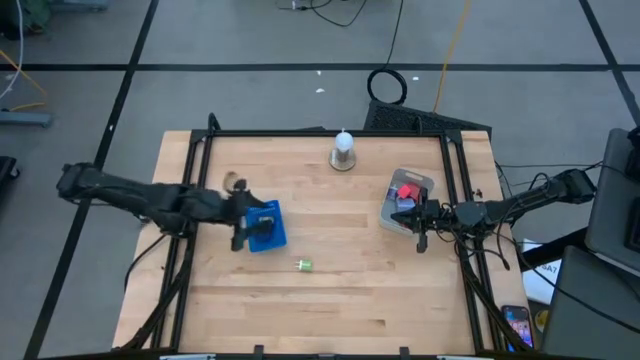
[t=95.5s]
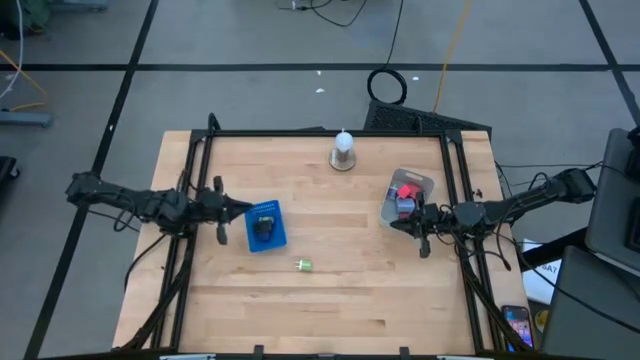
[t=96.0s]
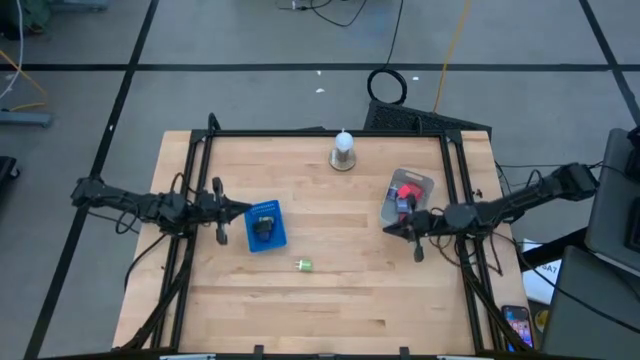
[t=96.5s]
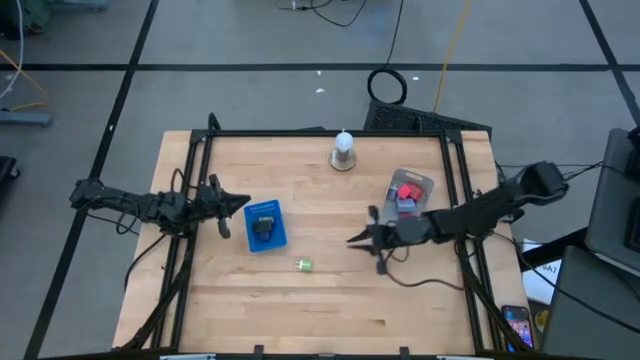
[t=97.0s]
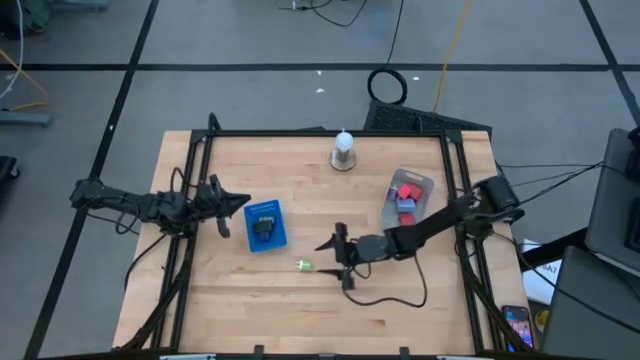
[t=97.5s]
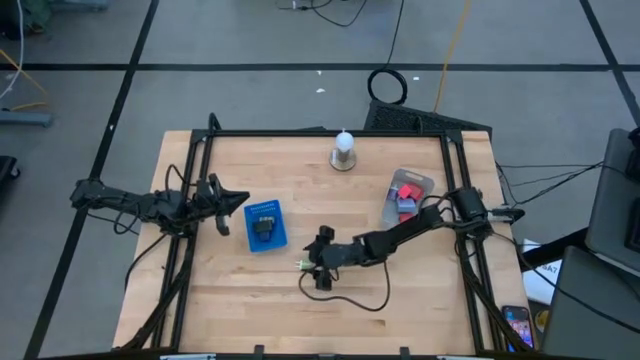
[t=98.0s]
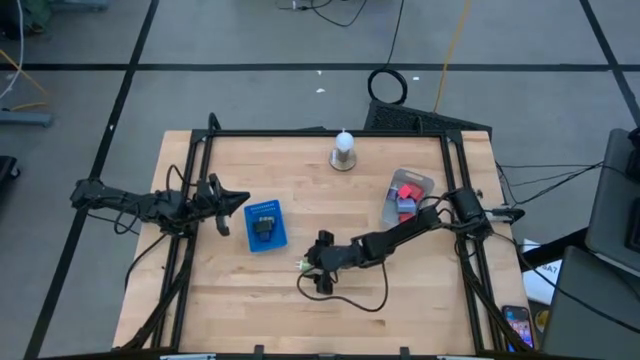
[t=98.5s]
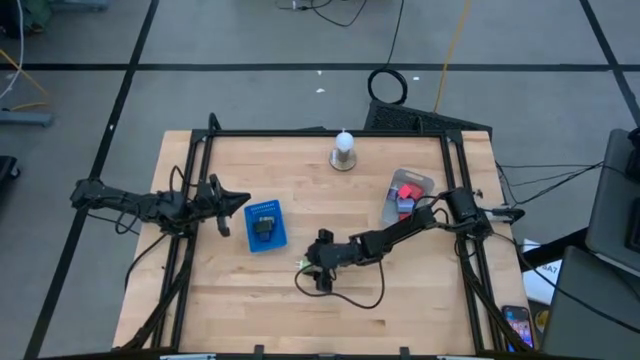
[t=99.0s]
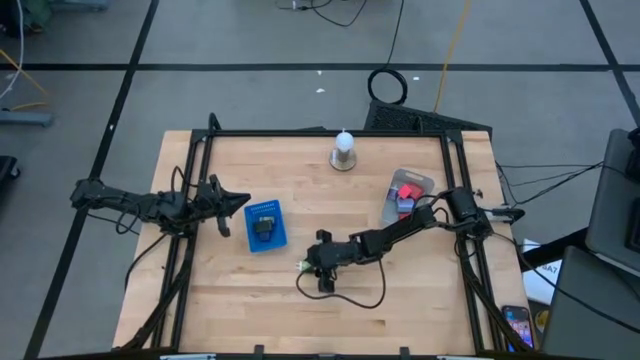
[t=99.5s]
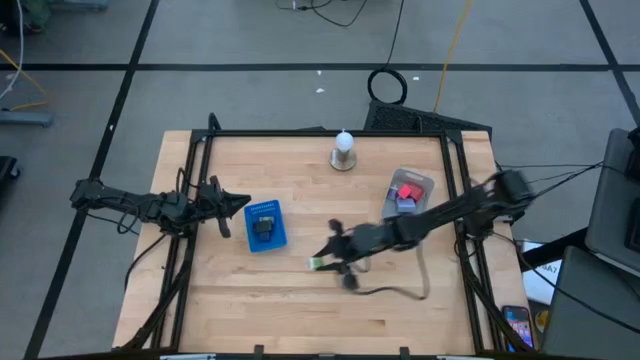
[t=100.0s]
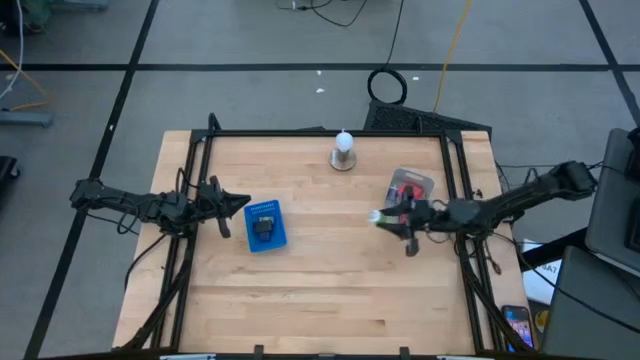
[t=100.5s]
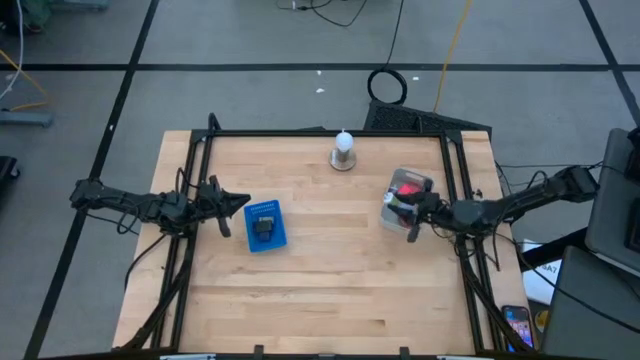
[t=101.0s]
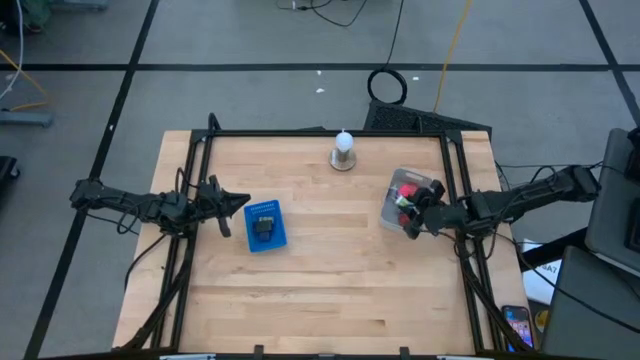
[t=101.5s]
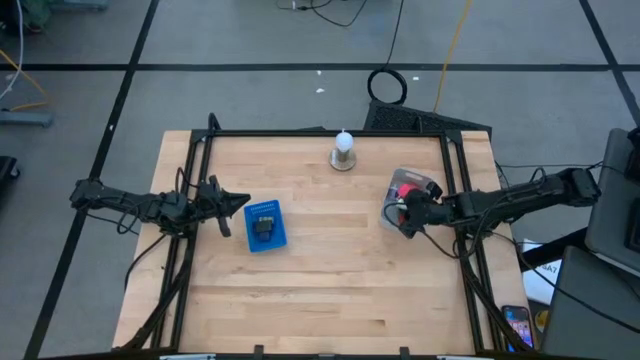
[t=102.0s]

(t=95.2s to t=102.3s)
Task: Pick & Place Office items
Put the green charger adapter into the gray bin

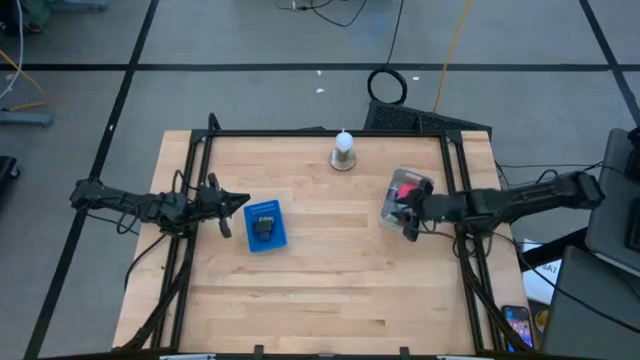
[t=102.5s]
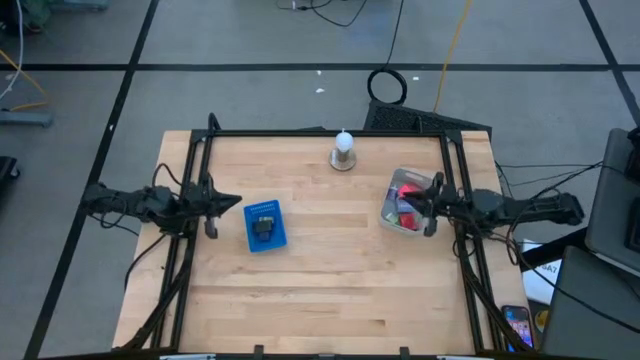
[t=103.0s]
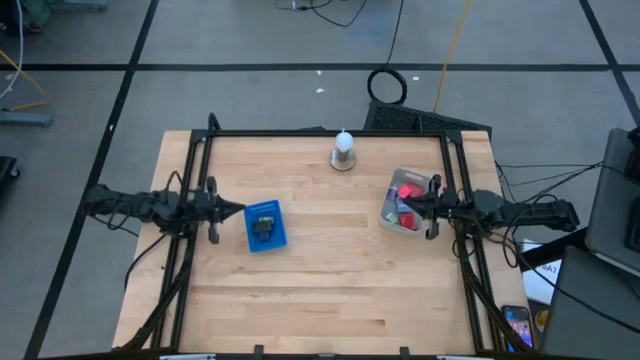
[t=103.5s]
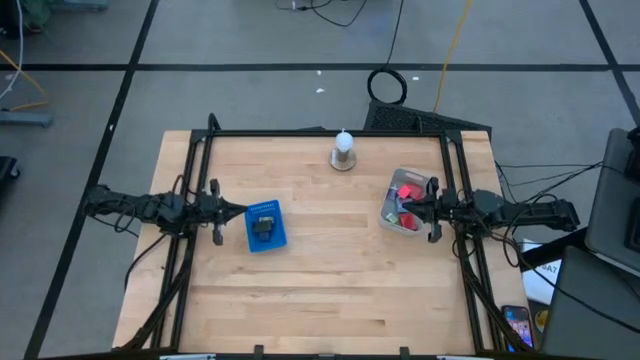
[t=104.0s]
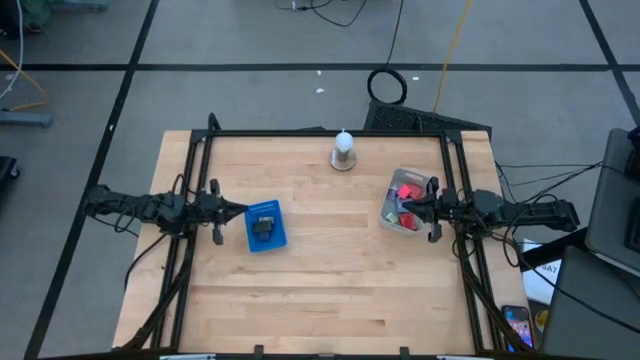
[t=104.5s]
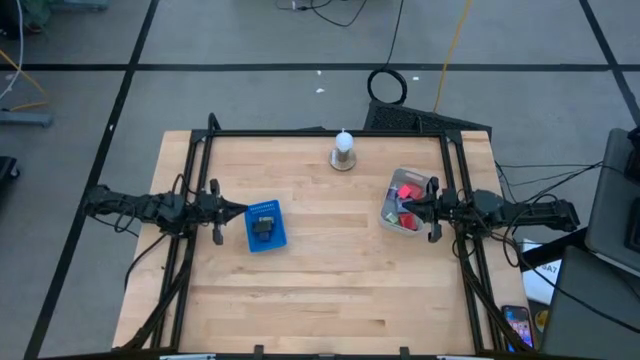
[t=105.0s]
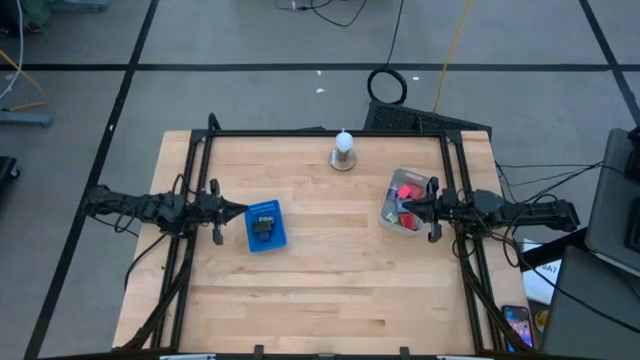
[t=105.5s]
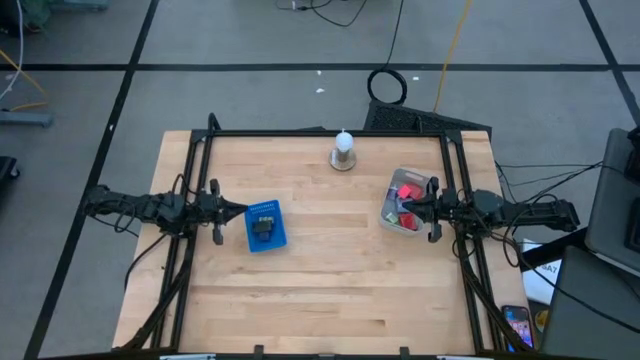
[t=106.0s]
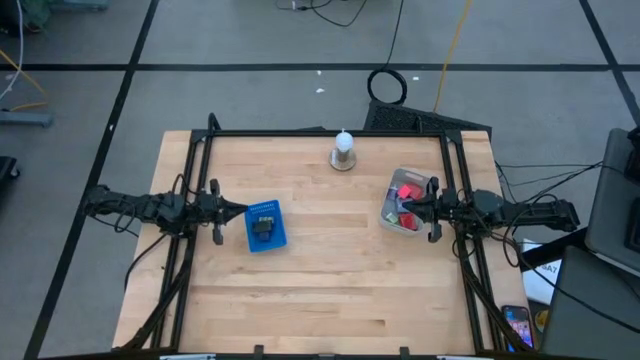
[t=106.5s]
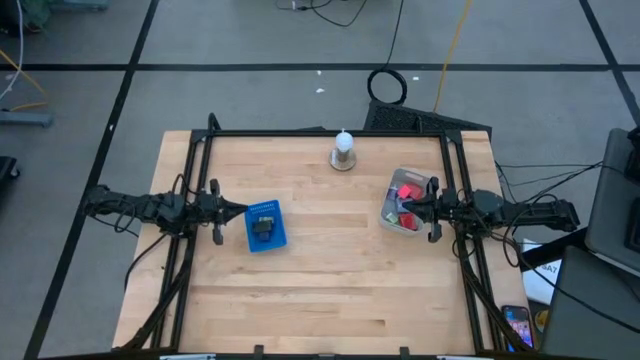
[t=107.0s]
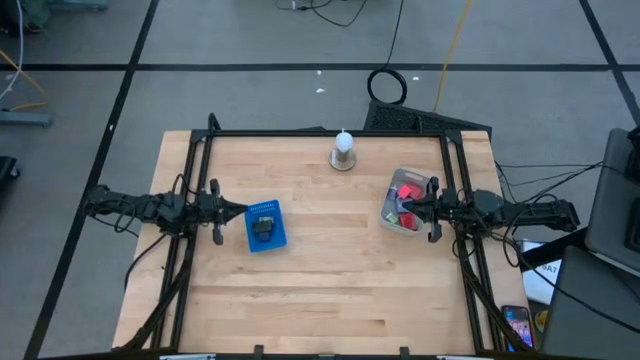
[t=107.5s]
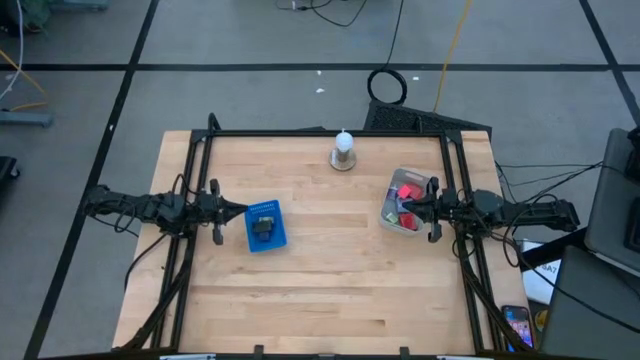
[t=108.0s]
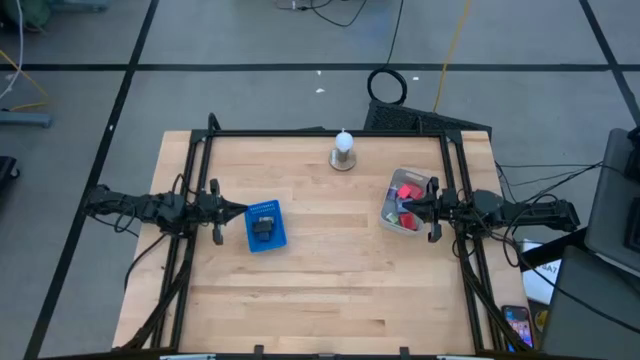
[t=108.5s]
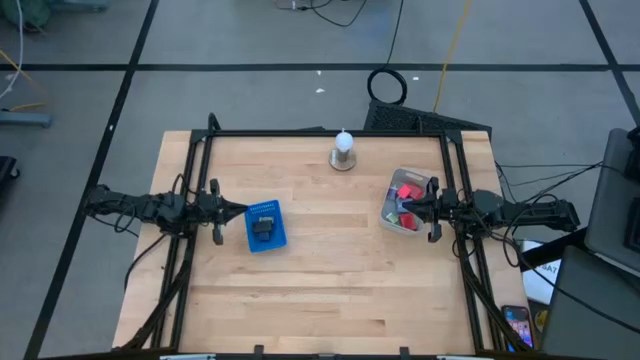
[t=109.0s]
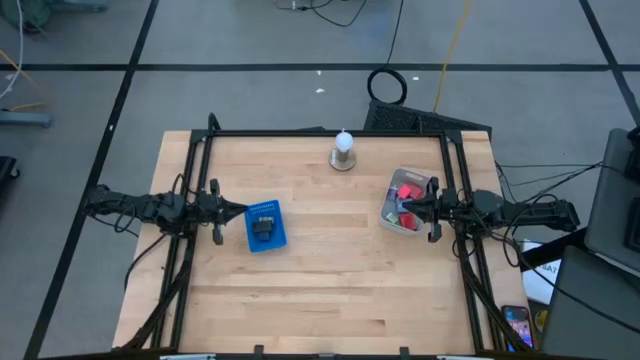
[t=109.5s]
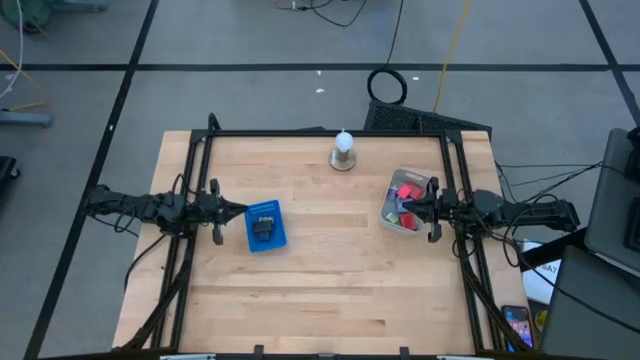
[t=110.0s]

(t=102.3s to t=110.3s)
Return to Home Position

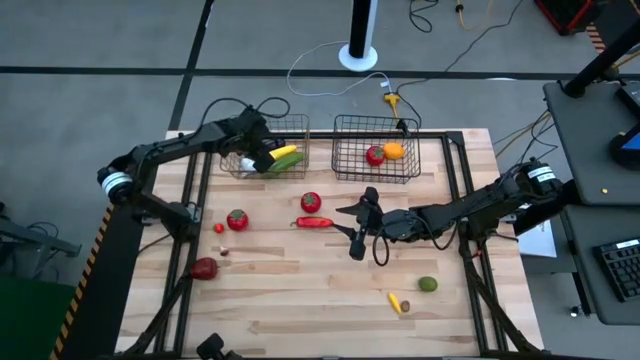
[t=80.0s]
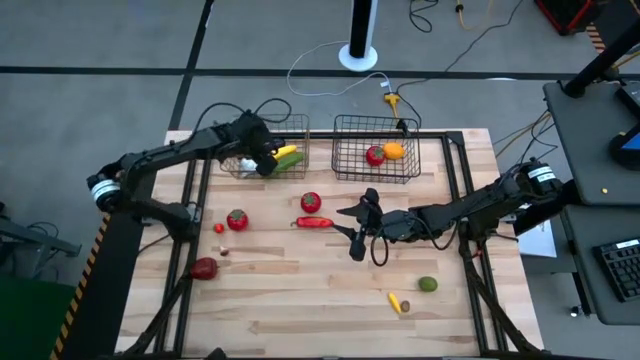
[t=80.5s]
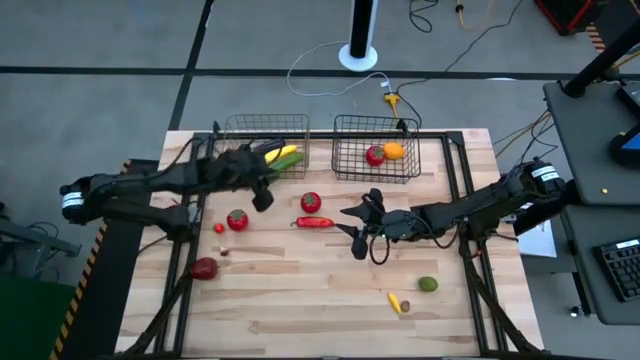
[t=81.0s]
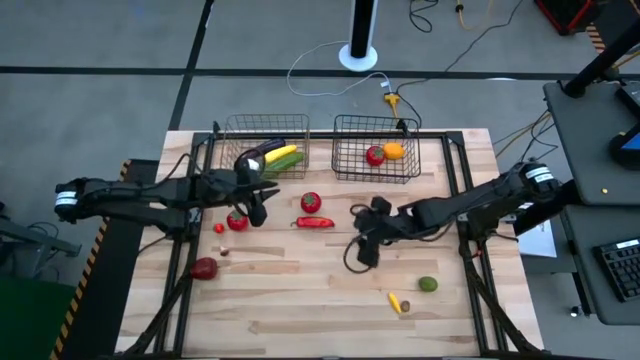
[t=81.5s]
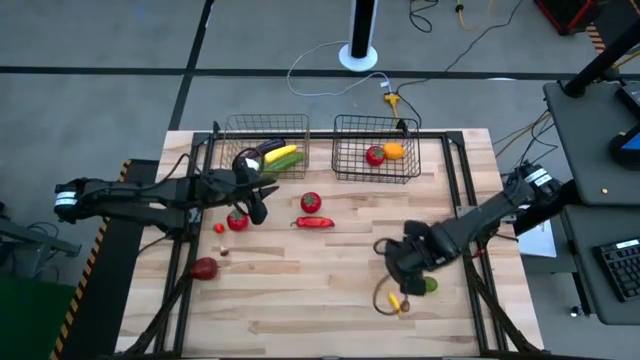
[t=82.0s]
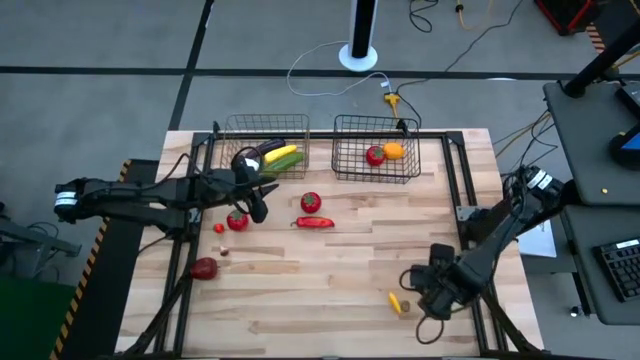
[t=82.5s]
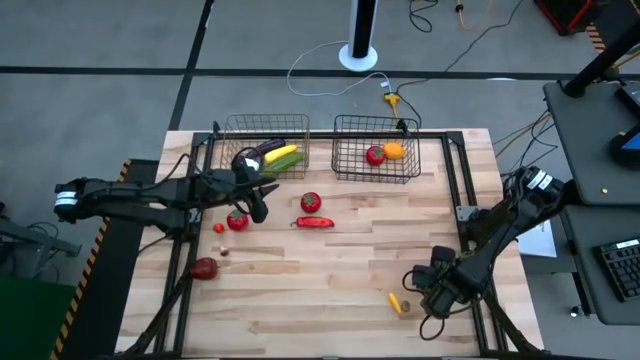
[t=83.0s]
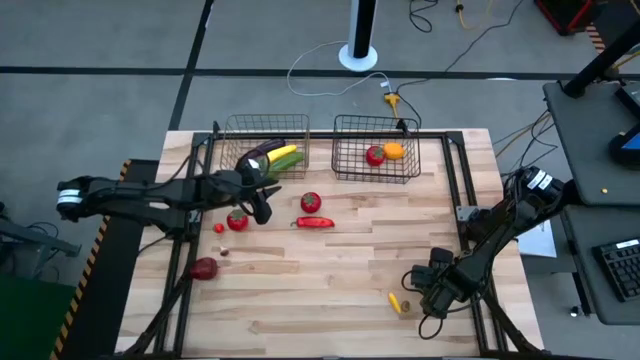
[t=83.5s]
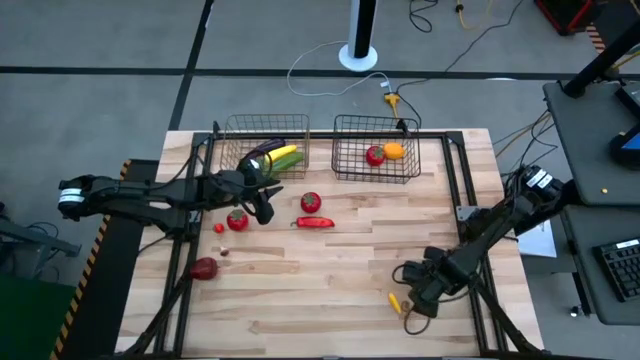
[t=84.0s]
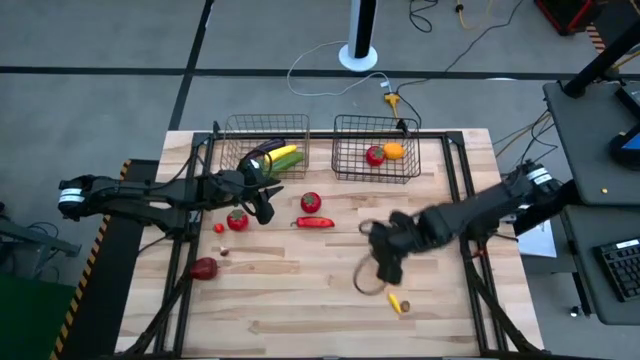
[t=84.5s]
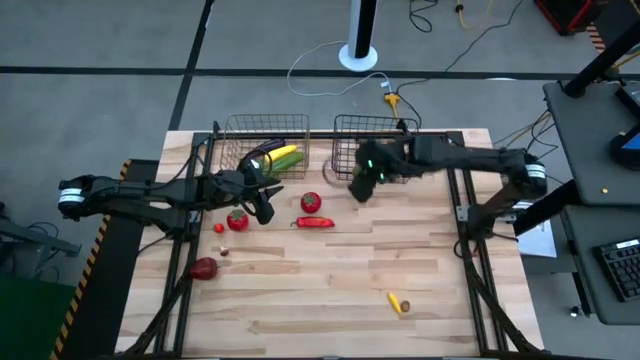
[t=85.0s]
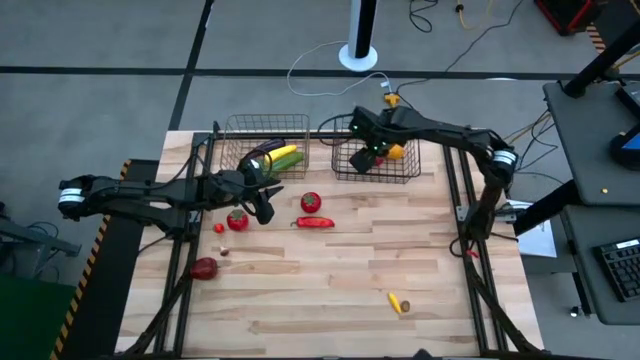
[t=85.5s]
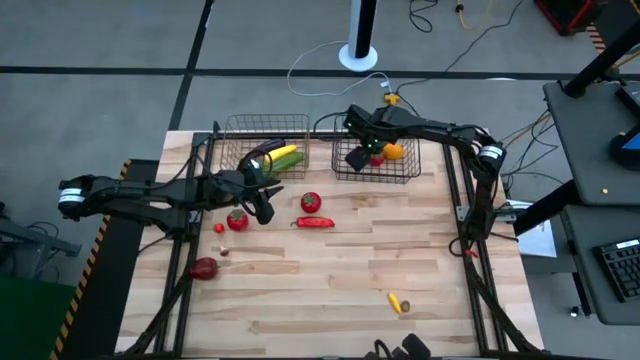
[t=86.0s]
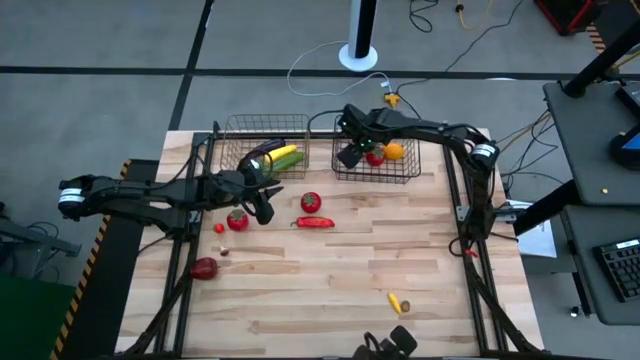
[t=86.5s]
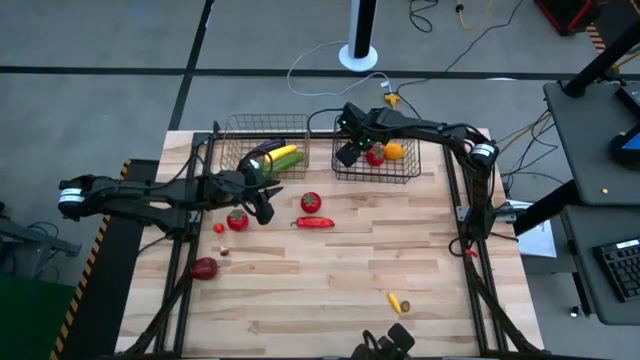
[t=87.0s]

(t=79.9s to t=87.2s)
Task: Sort produce into baskets
Put the green lime into the right wire basket
